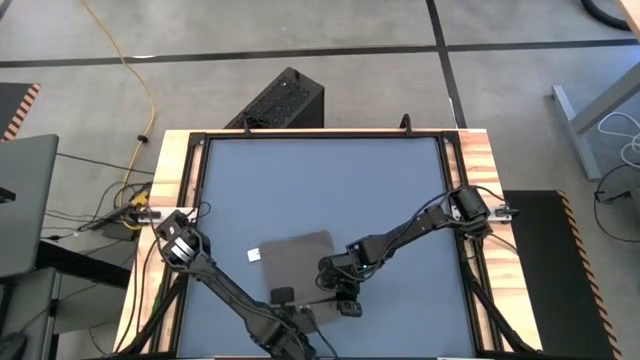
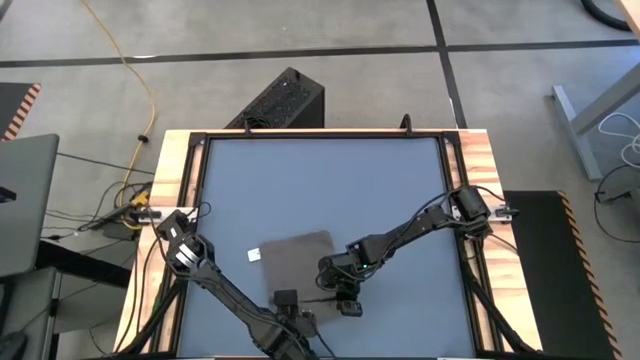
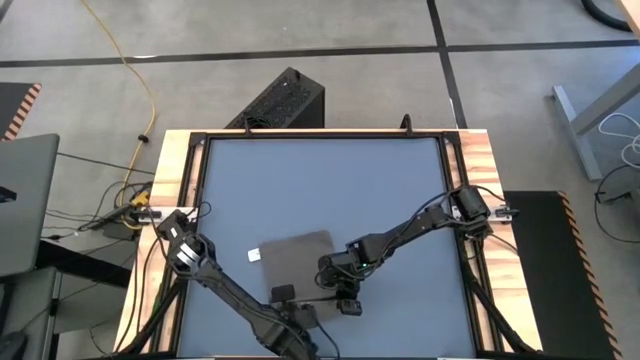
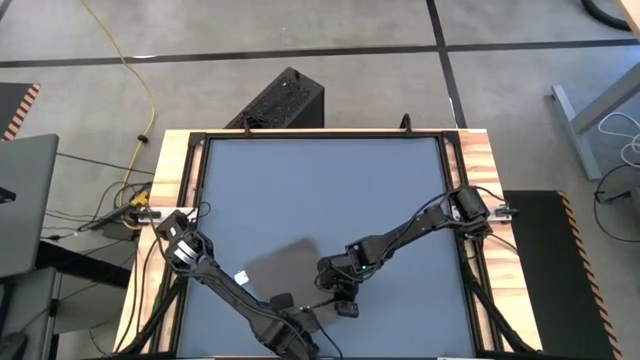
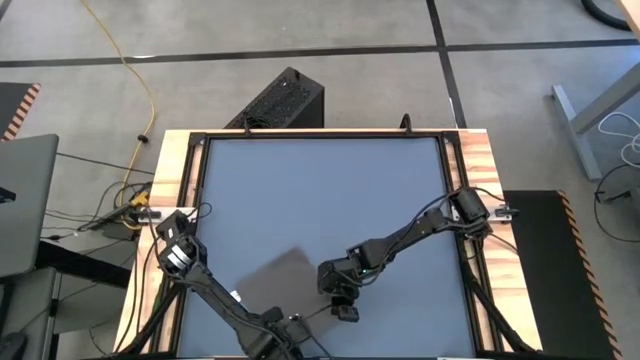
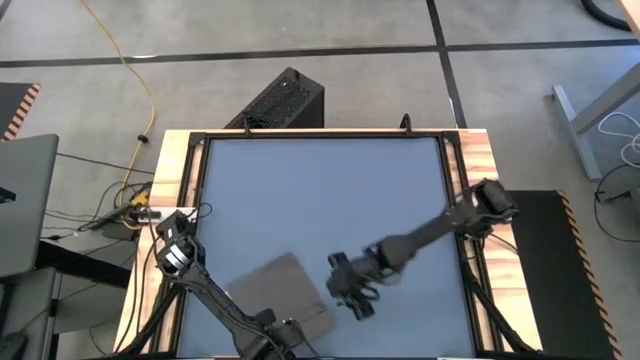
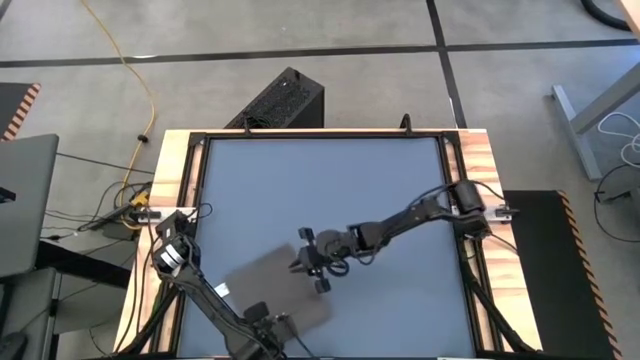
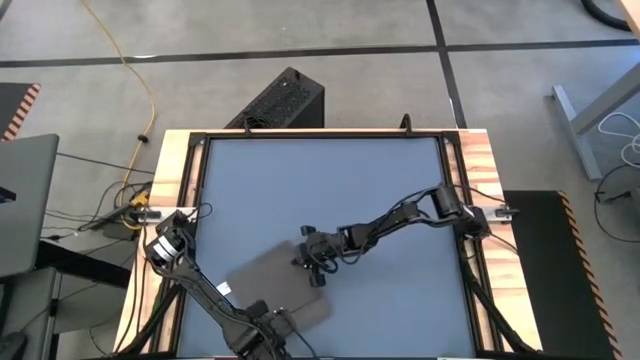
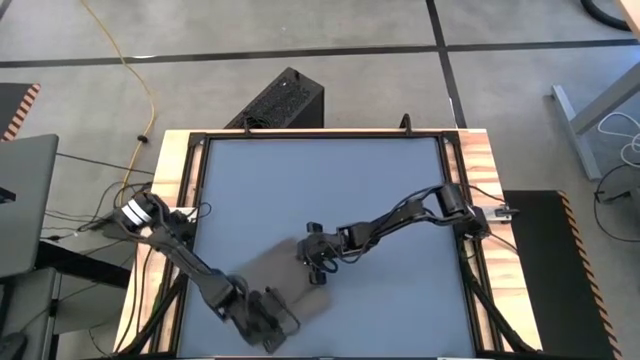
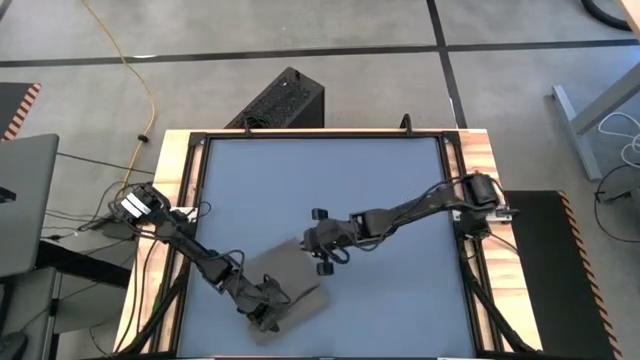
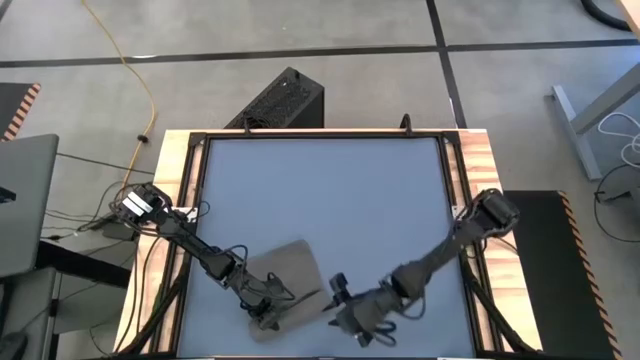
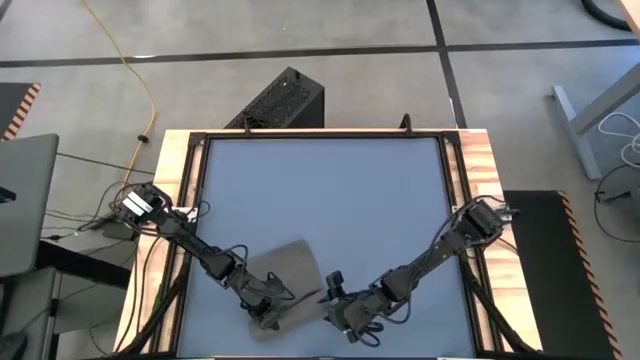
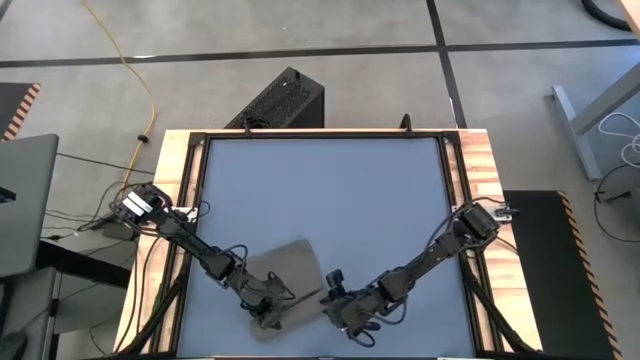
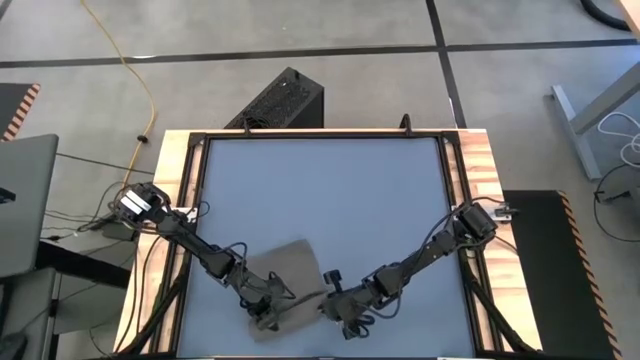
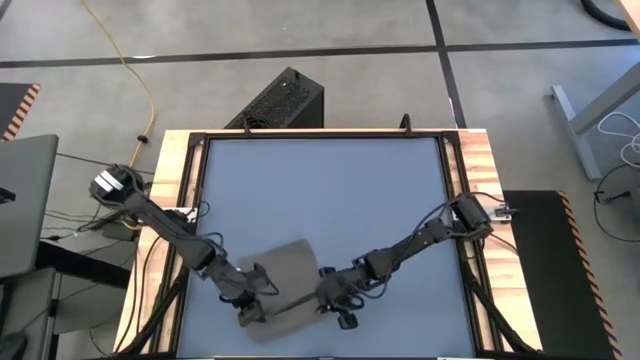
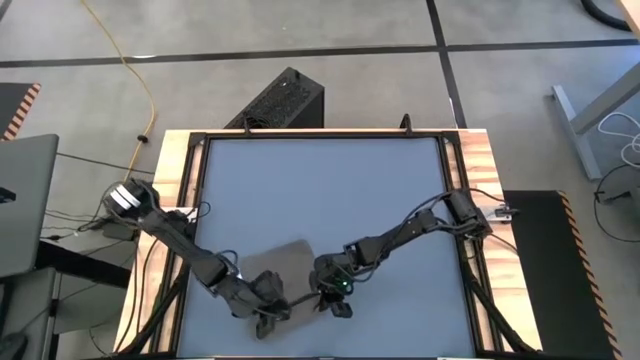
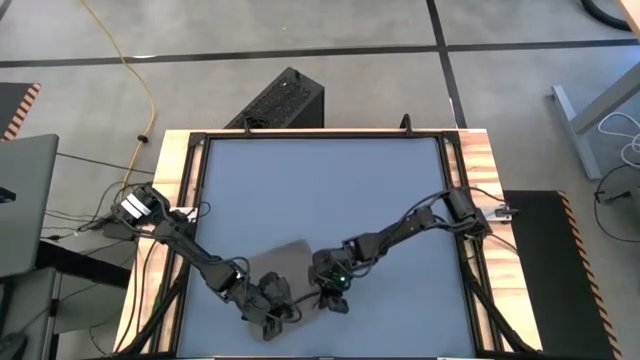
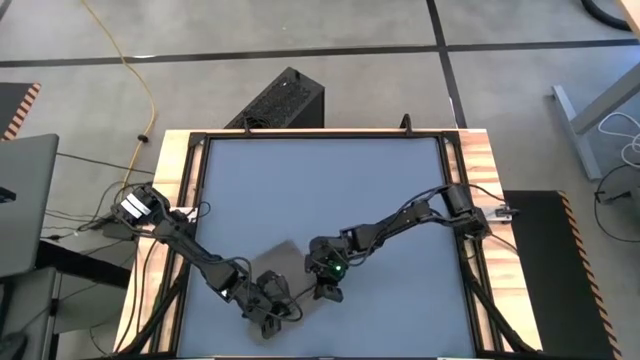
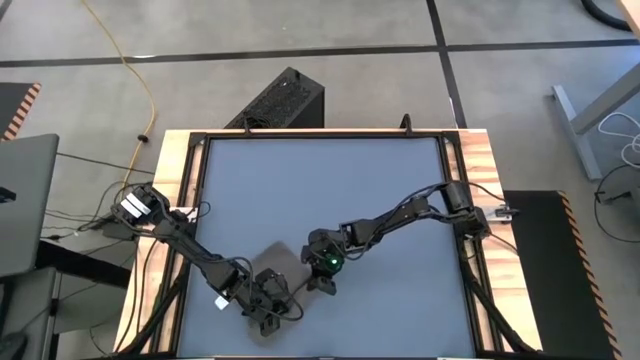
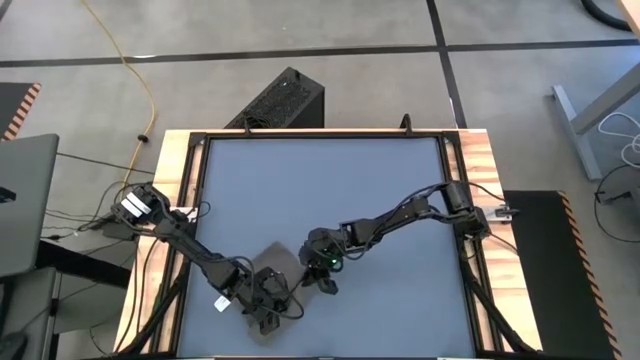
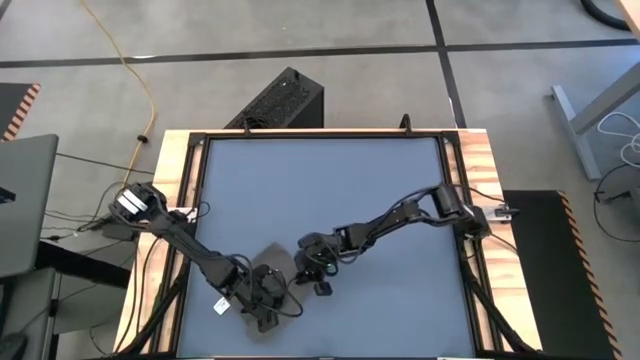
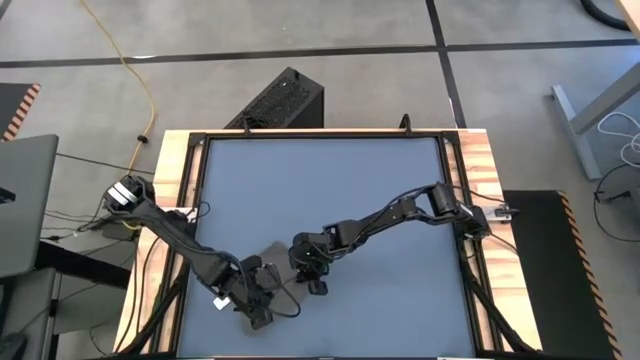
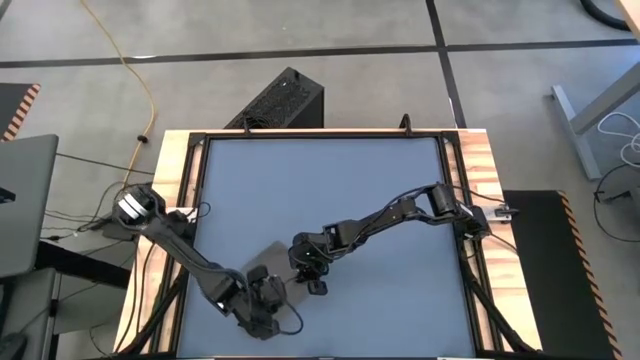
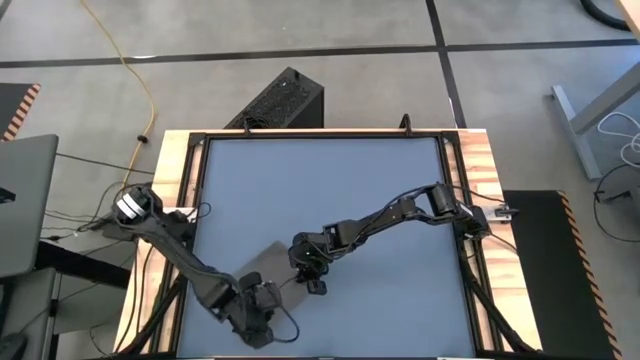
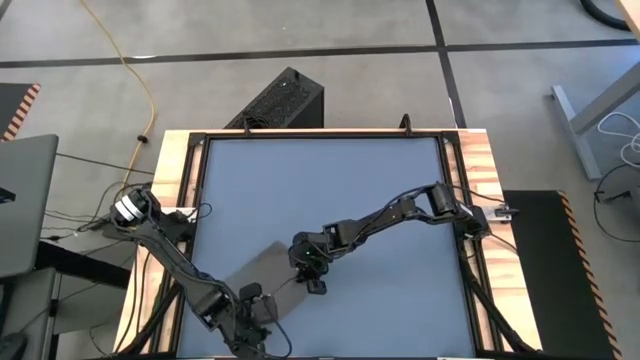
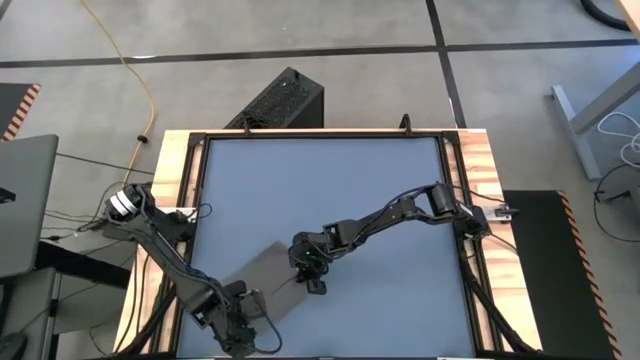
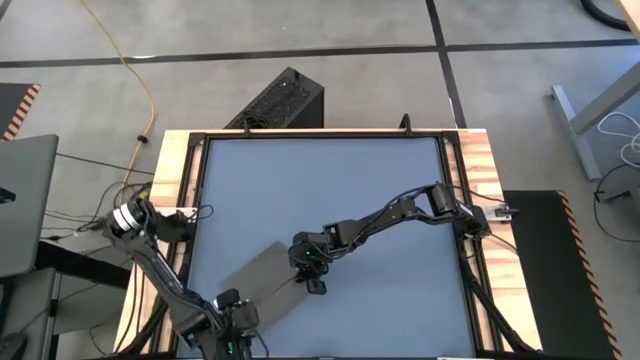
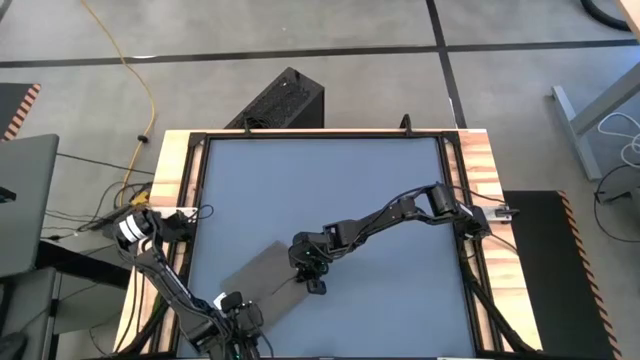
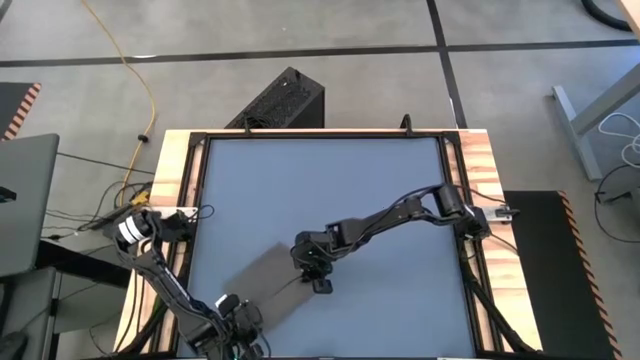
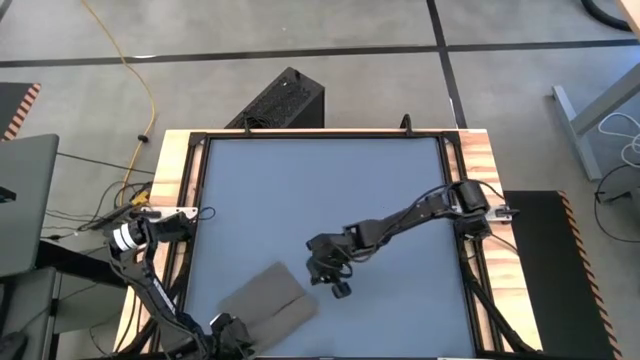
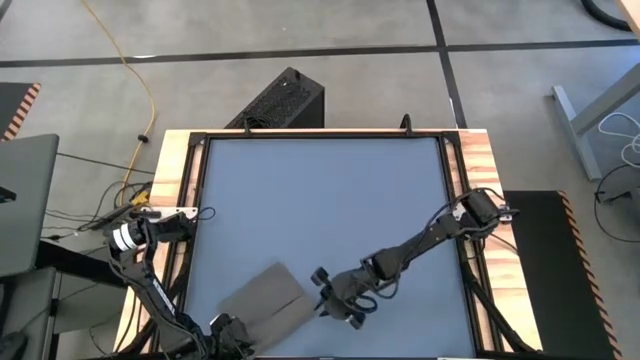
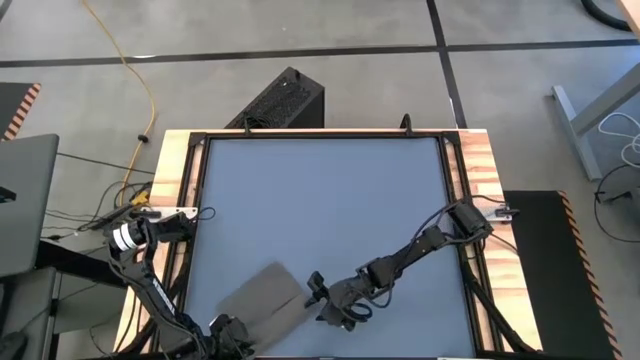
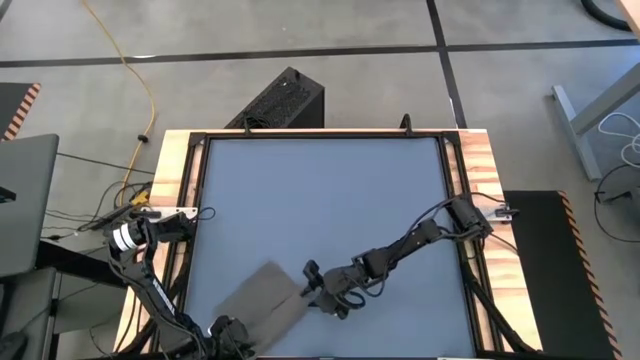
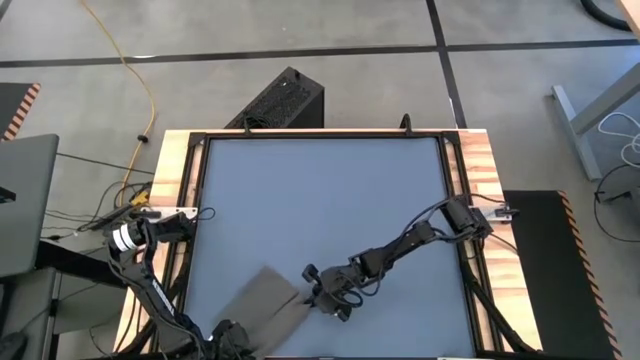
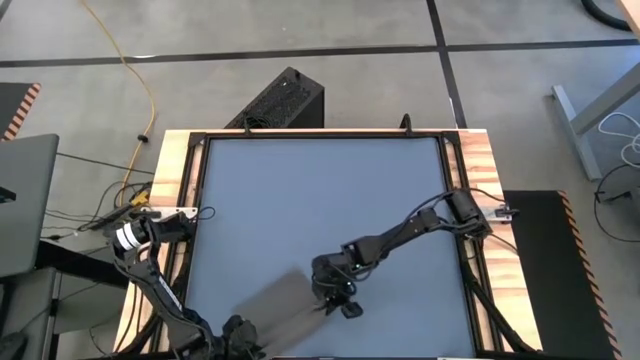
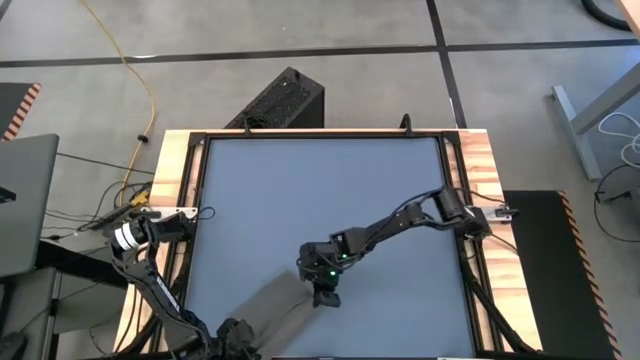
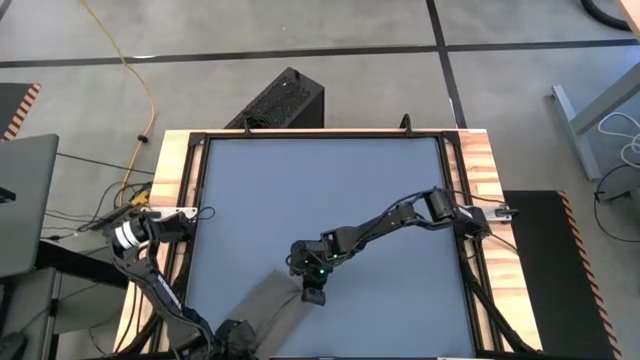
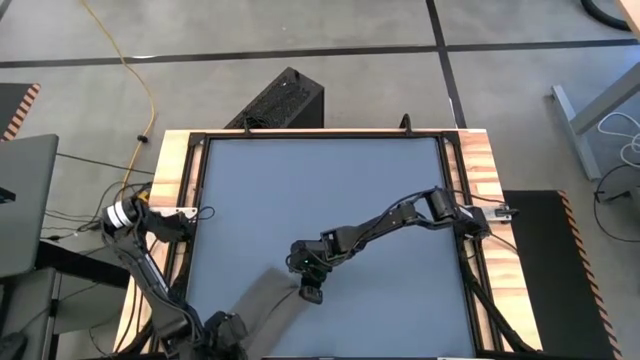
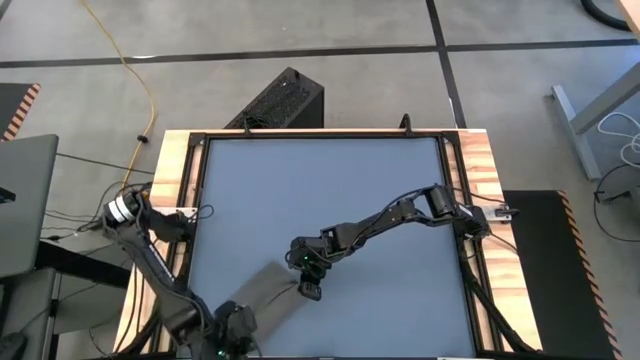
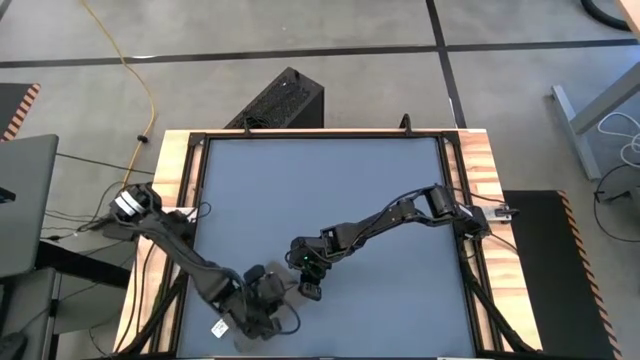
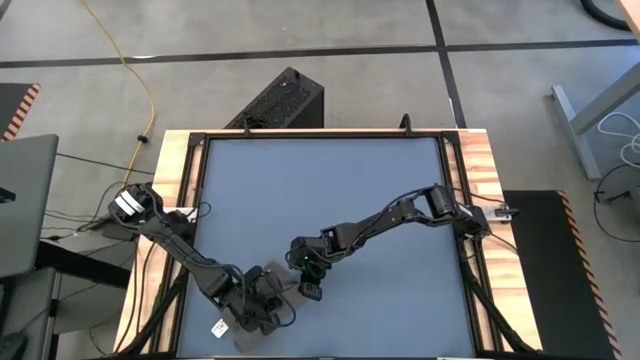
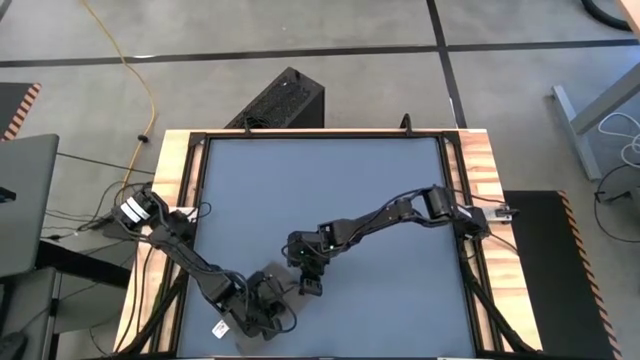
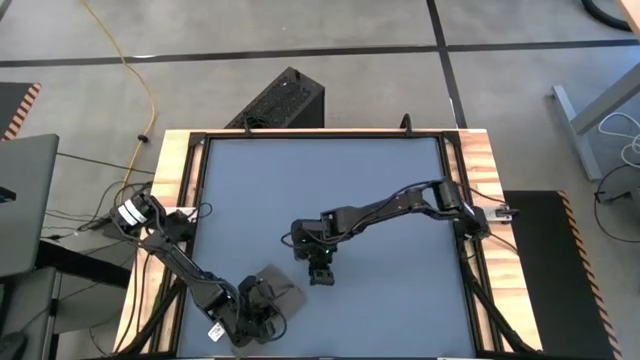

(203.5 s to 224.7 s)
Task: Roll towel into tight, uniform cylinder
Roll the gray towel
